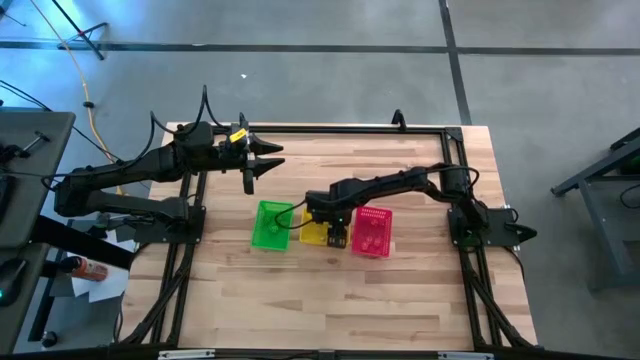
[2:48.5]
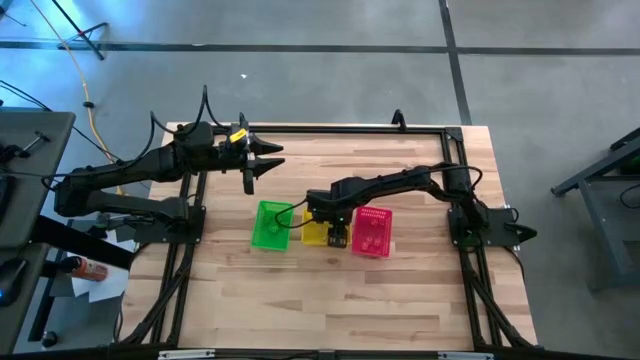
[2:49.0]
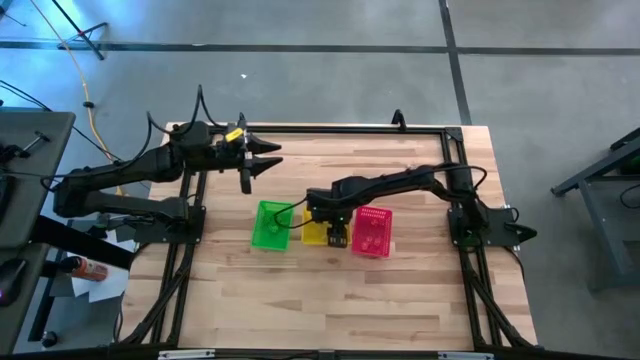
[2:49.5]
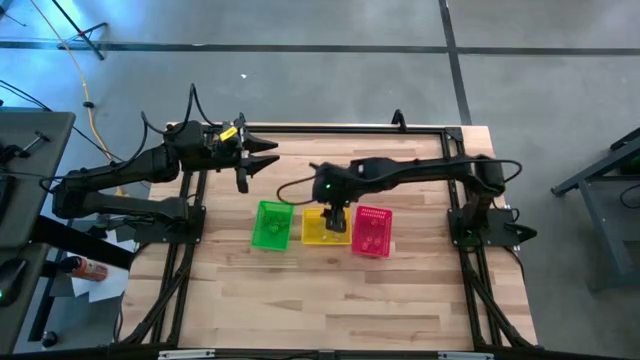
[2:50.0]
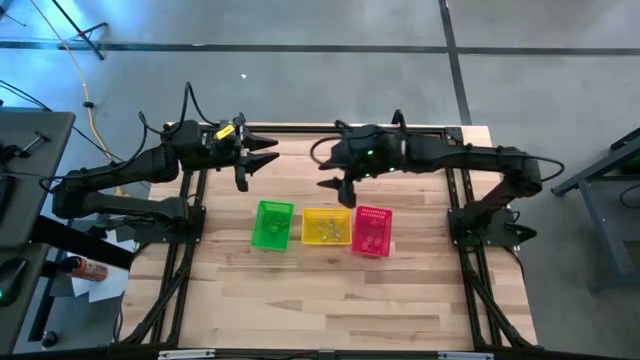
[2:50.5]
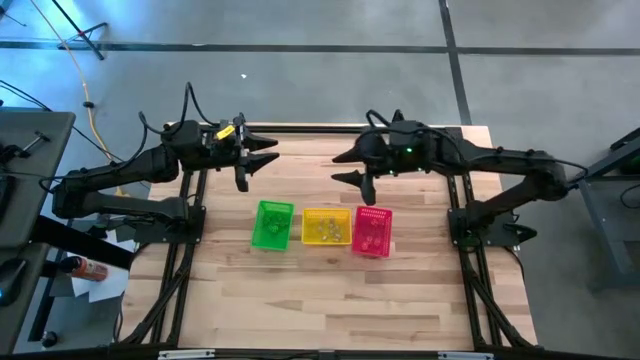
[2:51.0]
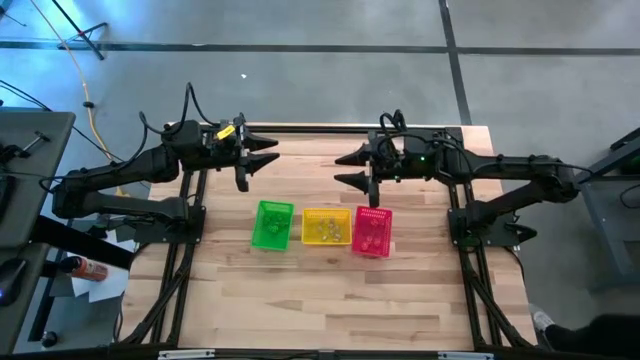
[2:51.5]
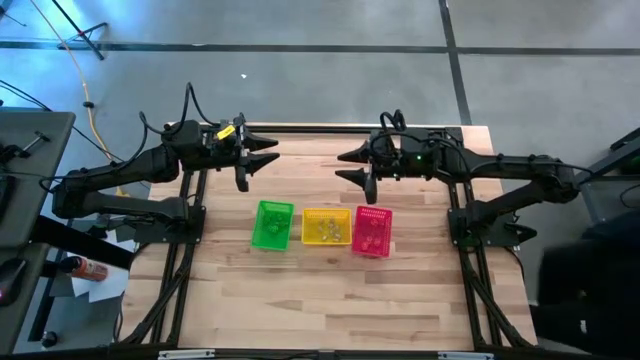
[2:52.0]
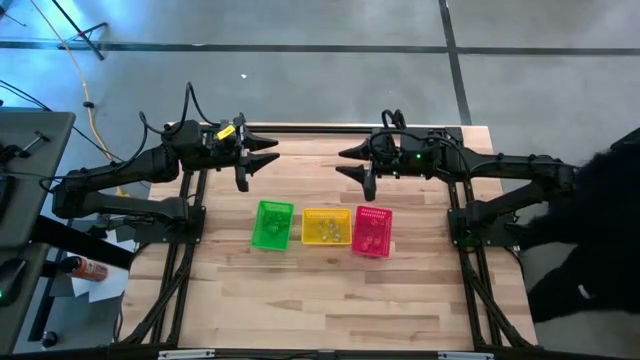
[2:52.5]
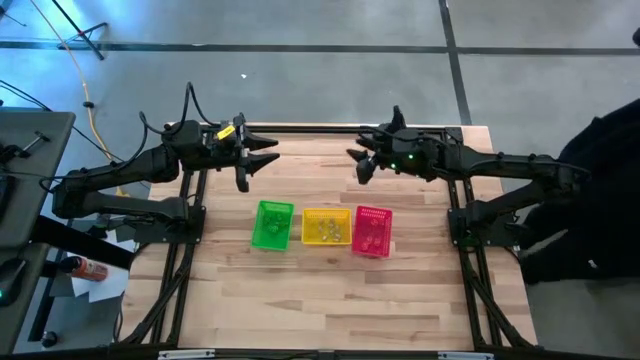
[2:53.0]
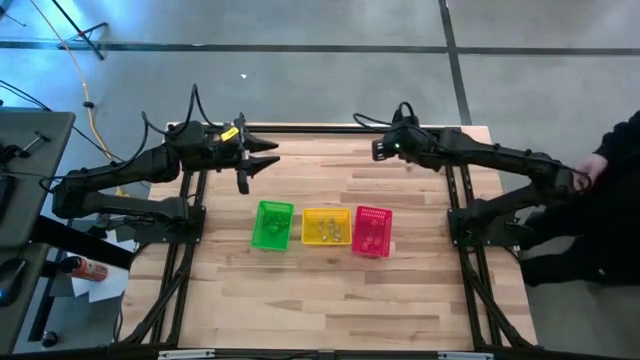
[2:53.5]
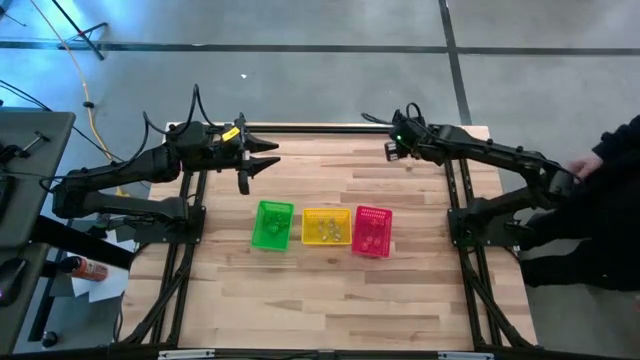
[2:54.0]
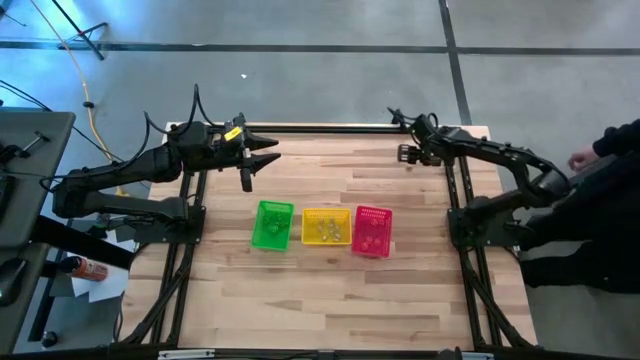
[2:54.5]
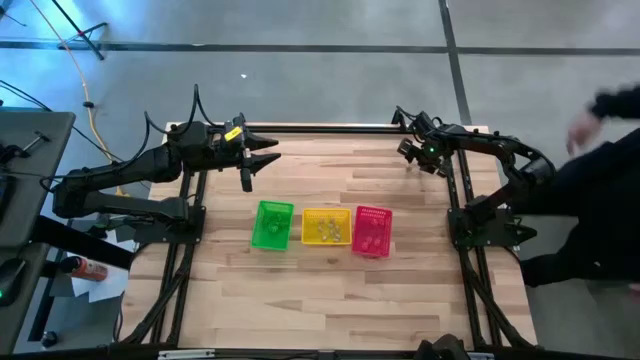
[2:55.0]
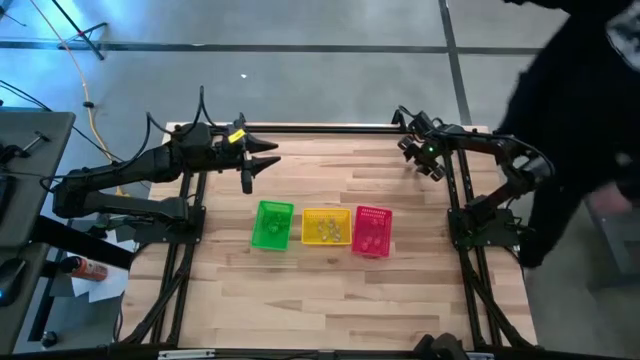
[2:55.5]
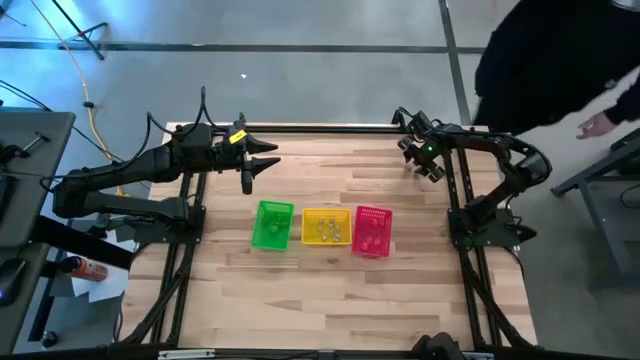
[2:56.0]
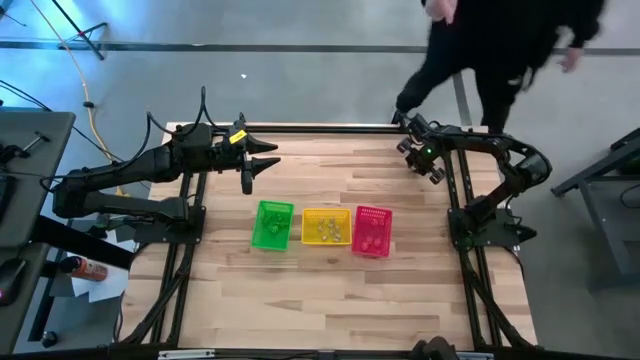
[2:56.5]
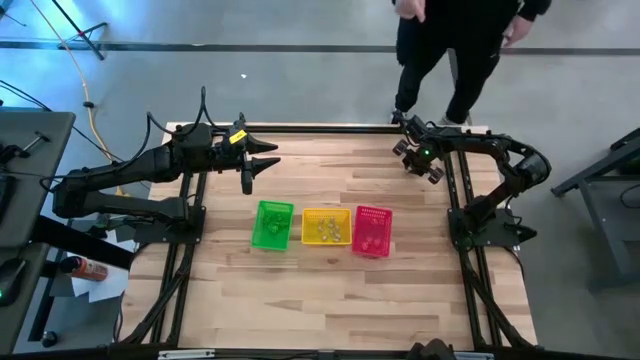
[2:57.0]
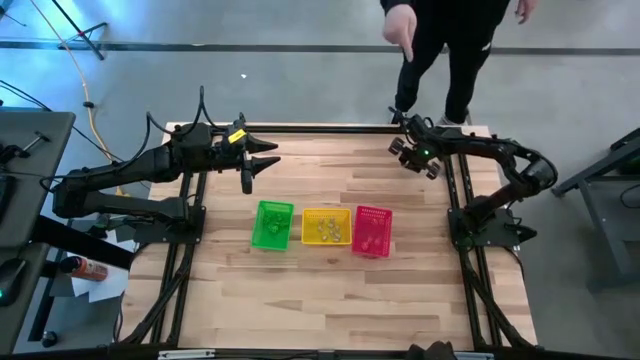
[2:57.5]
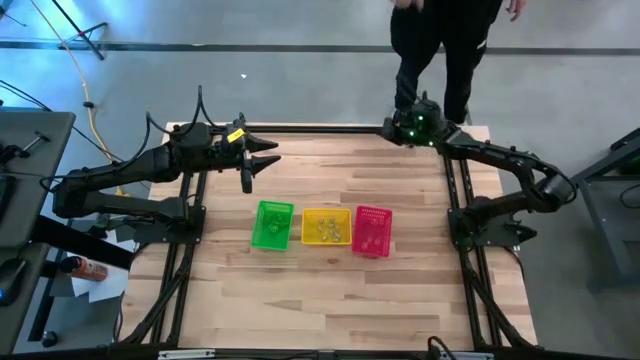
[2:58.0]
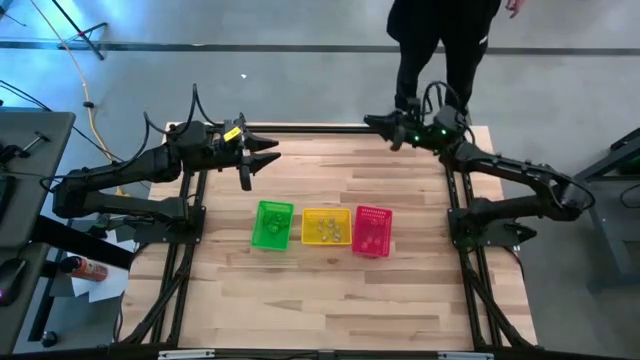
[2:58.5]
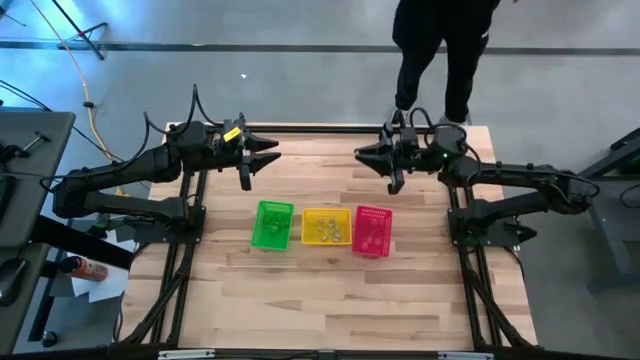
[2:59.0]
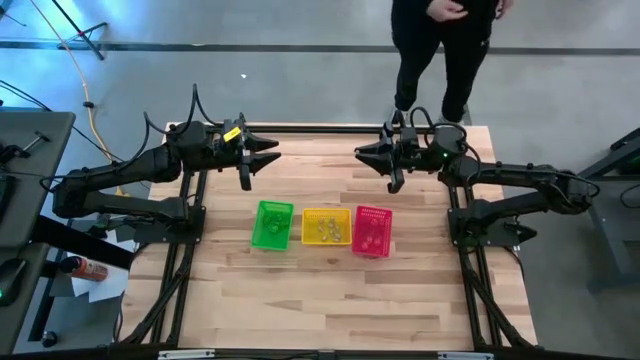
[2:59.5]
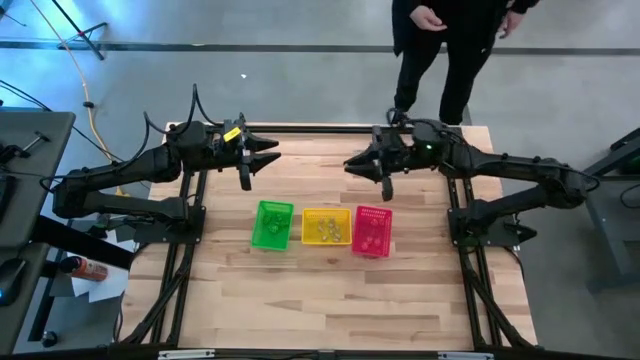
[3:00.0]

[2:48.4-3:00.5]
Task: Sort Halloween decoration
Put the white skull toy into the yellow basket

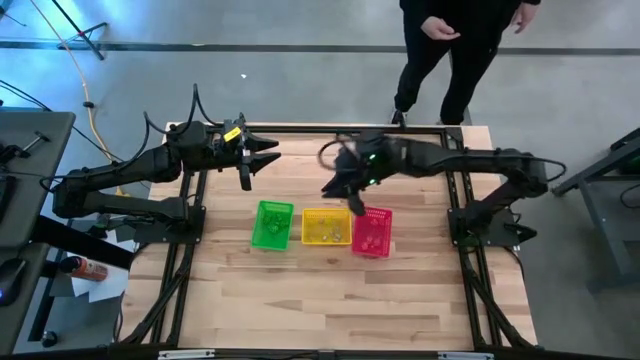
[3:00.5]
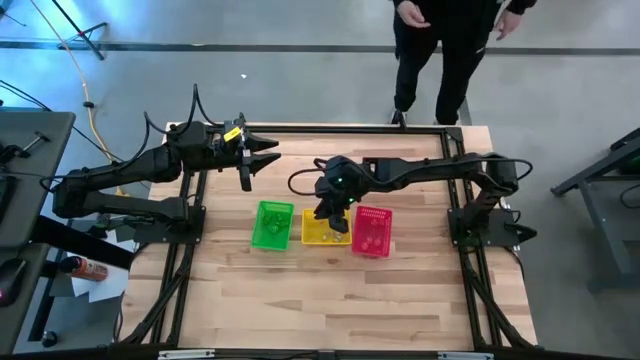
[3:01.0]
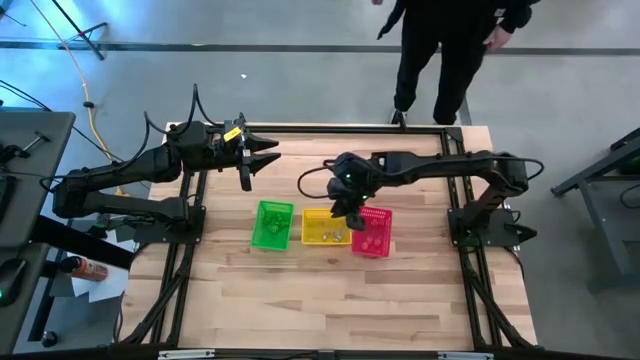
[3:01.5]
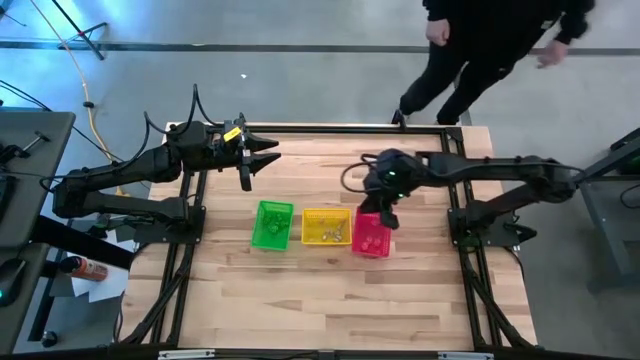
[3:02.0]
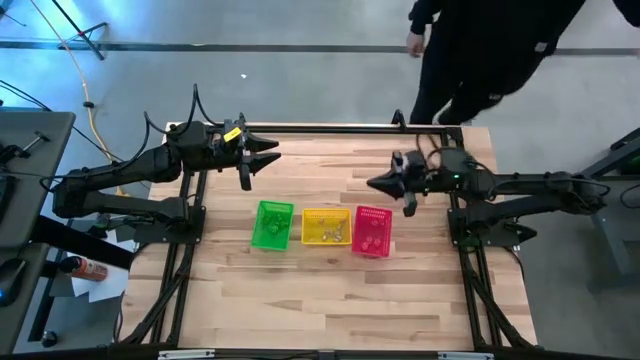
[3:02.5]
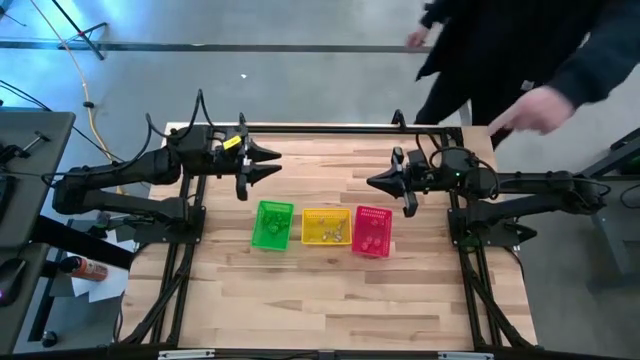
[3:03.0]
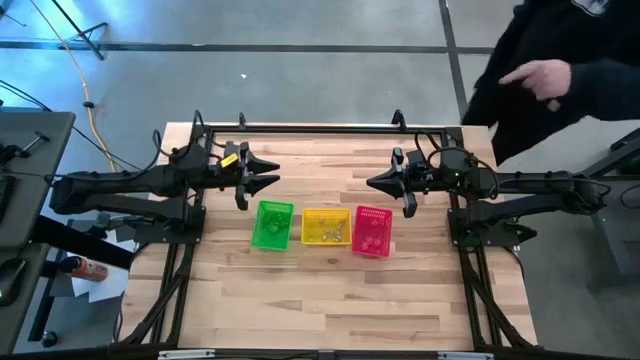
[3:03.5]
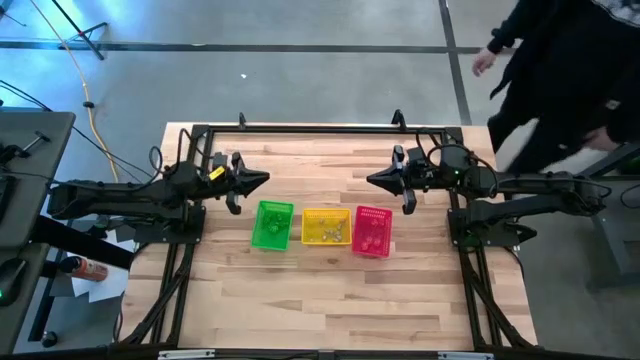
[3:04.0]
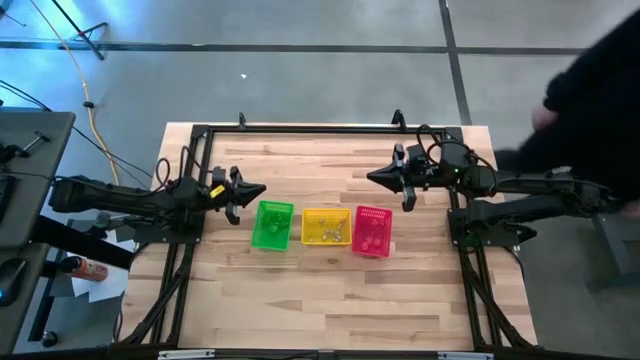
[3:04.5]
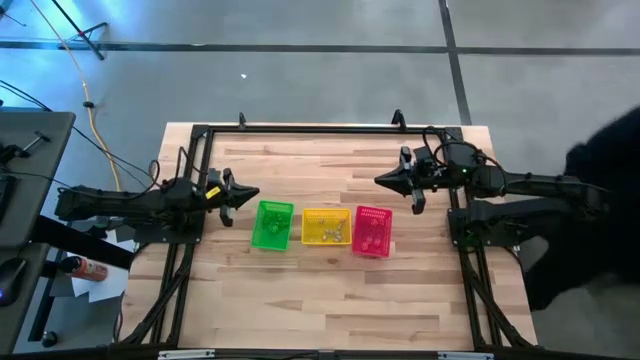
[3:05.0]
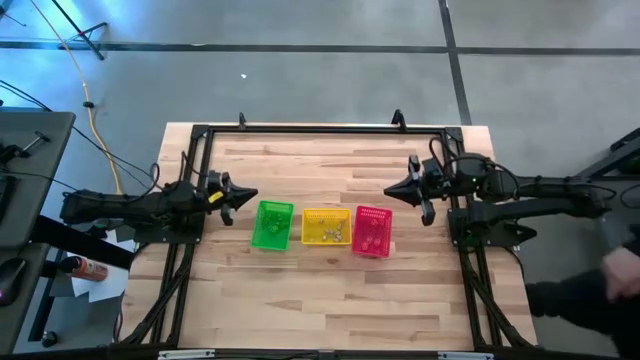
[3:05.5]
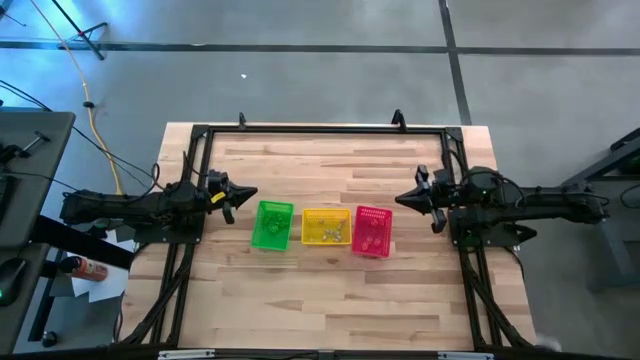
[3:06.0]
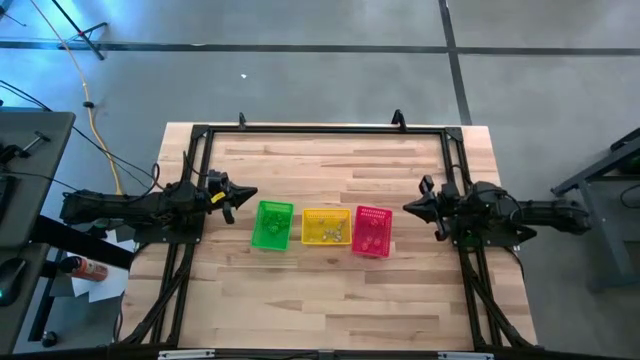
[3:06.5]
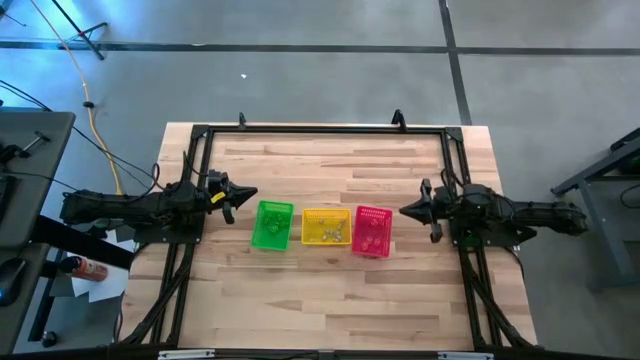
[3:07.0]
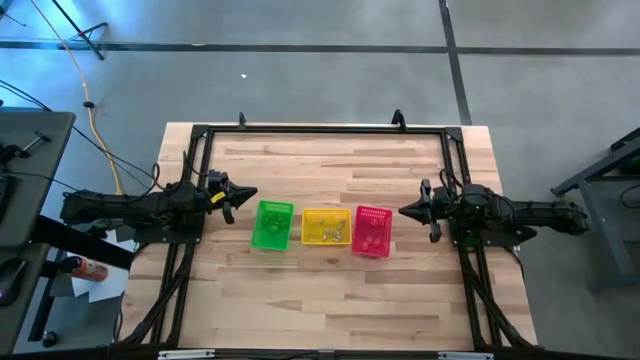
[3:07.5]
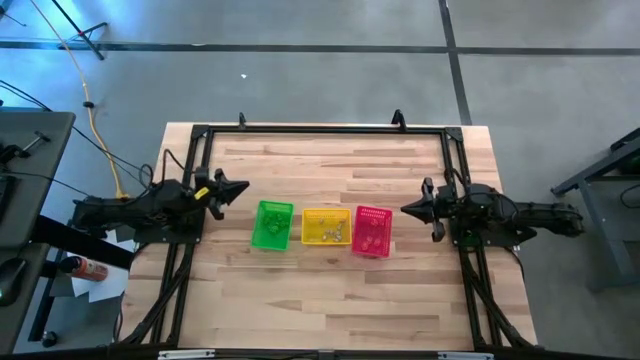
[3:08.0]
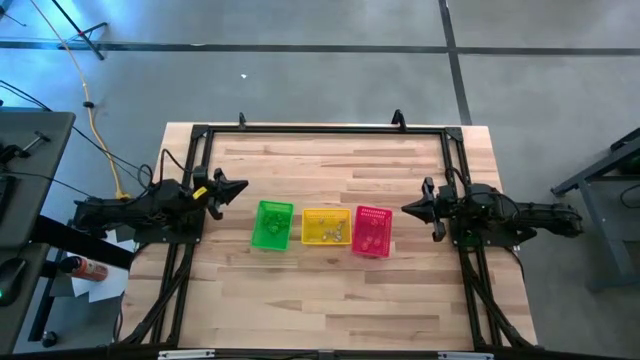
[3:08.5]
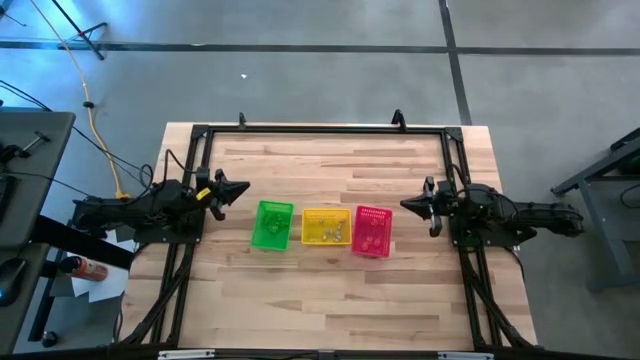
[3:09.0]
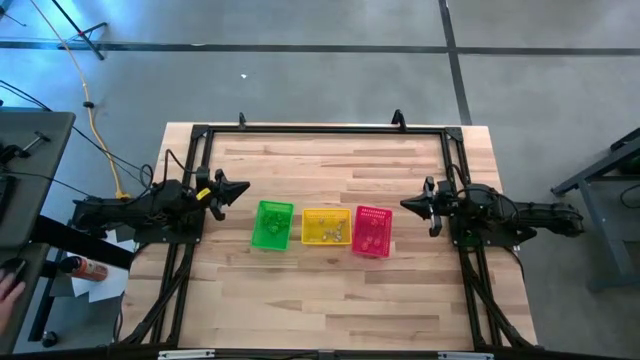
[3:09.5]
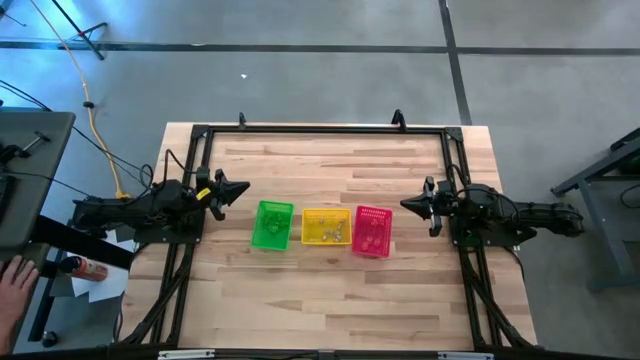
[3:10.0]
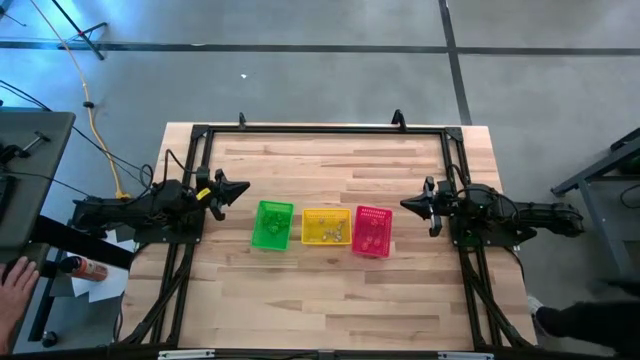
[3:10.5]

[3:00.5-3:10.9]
Return to Home Position
